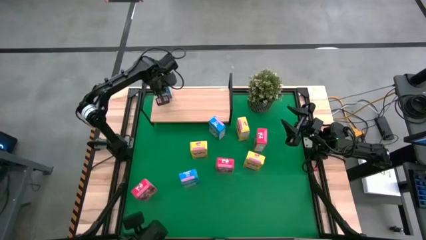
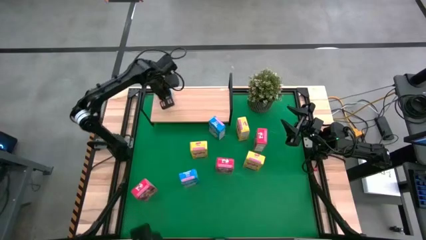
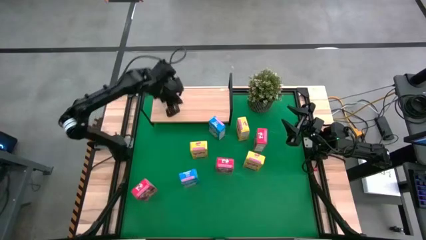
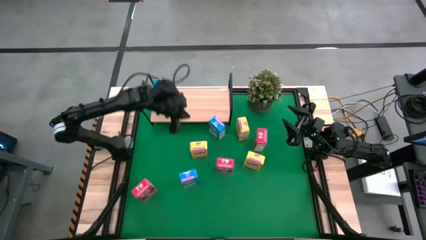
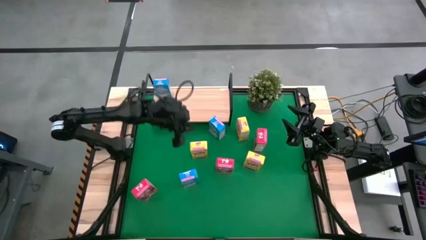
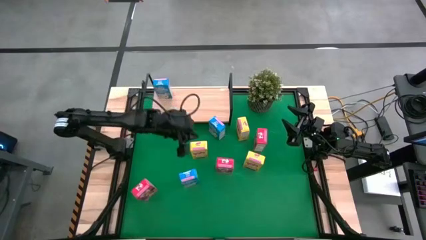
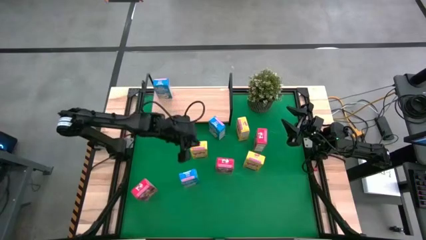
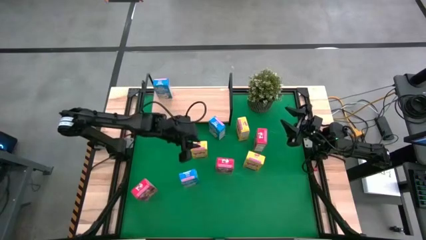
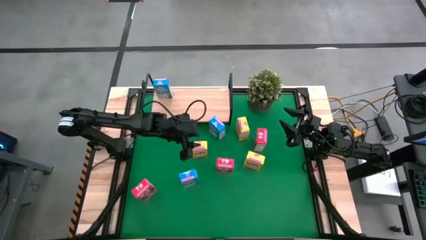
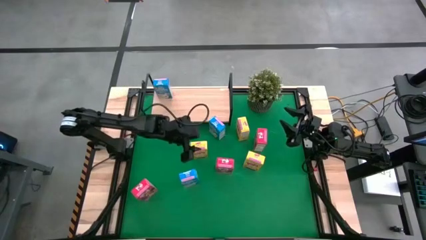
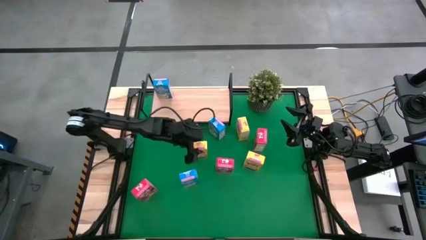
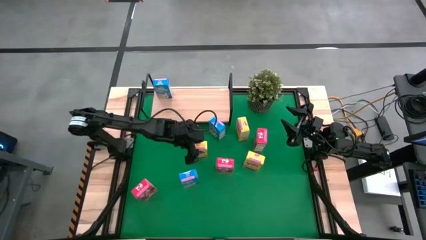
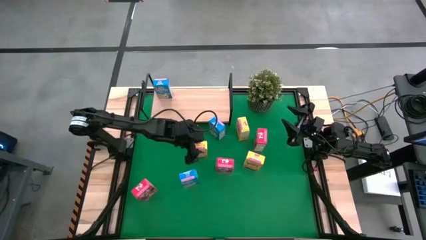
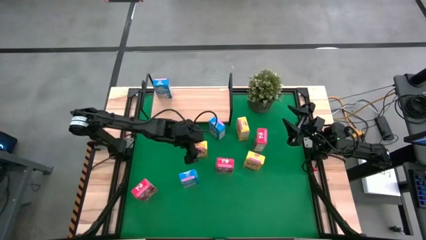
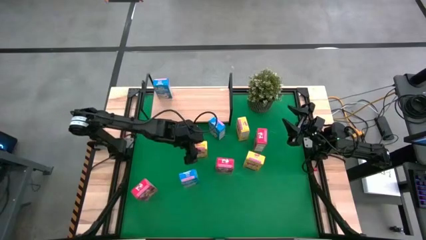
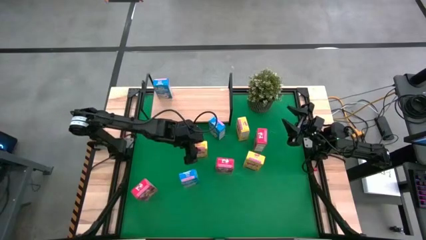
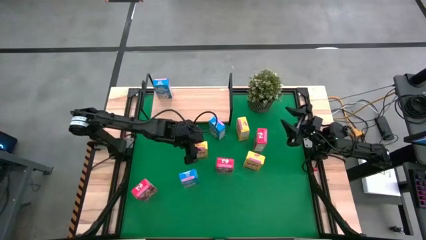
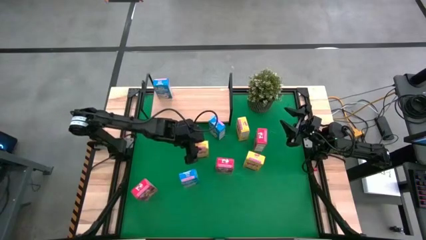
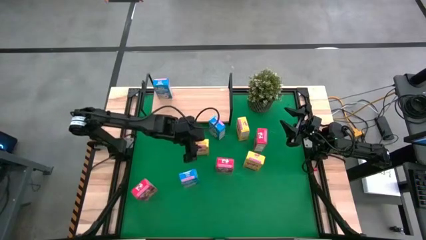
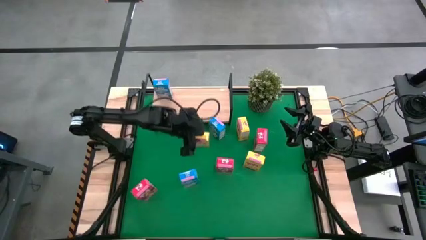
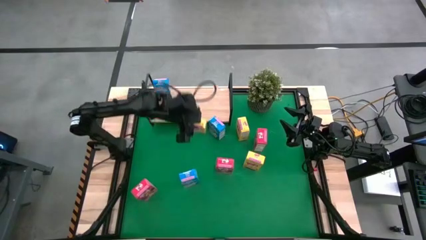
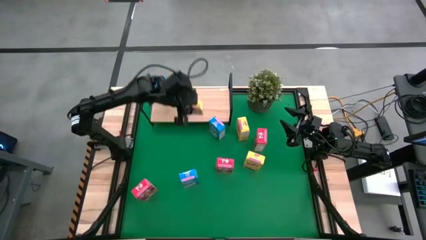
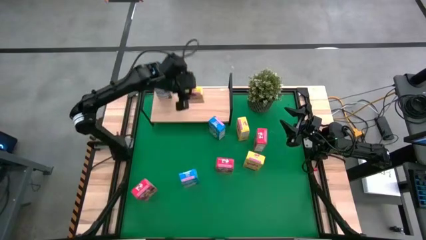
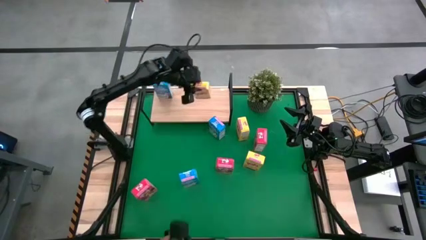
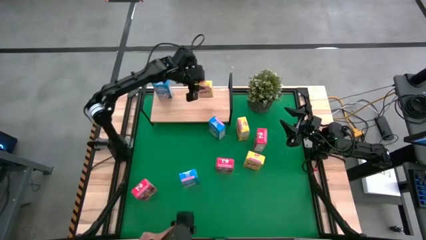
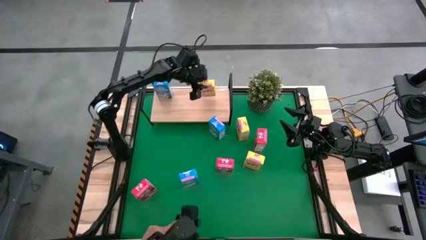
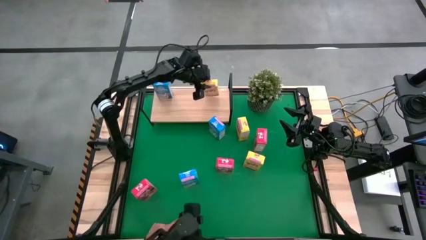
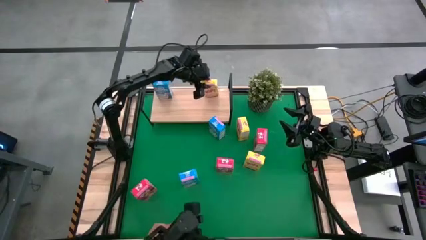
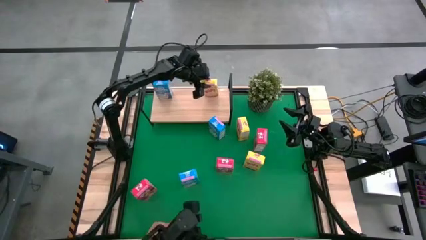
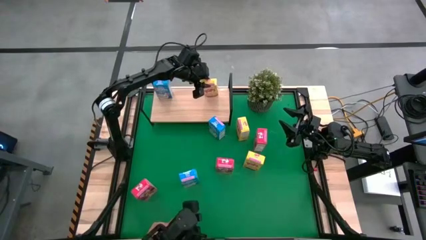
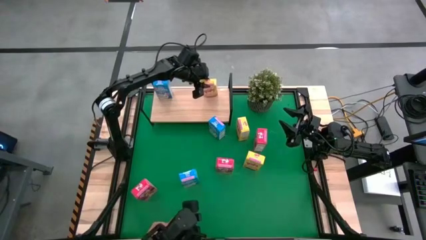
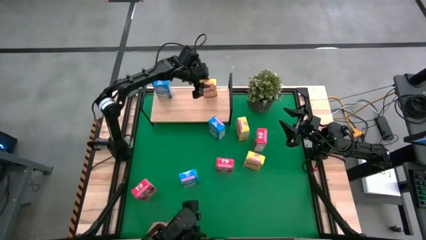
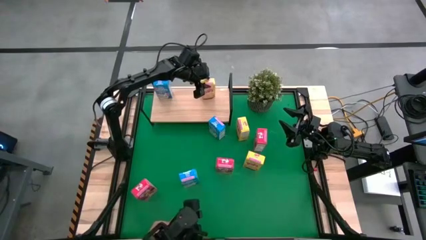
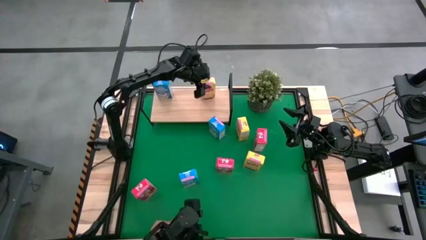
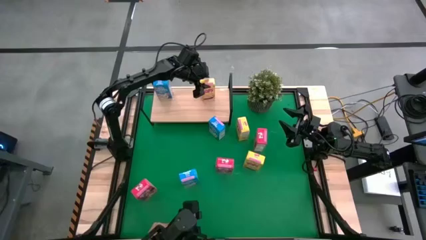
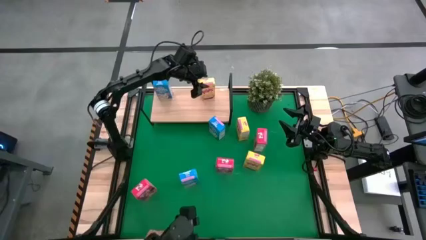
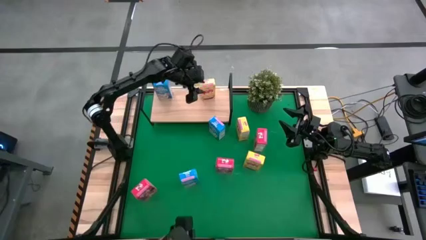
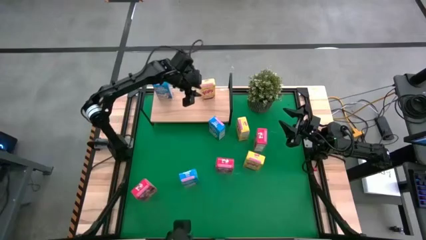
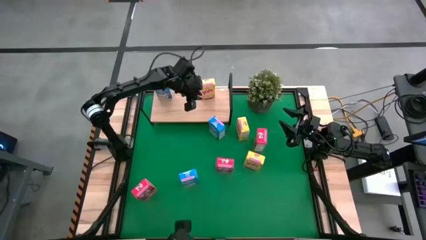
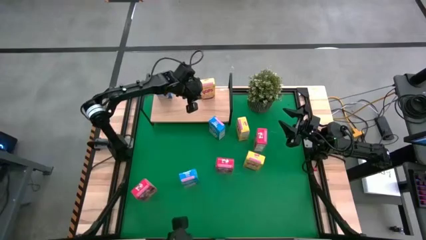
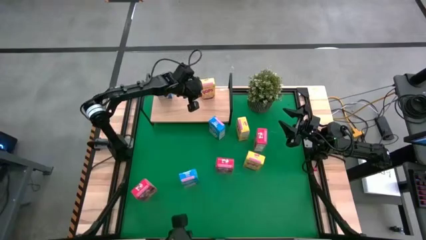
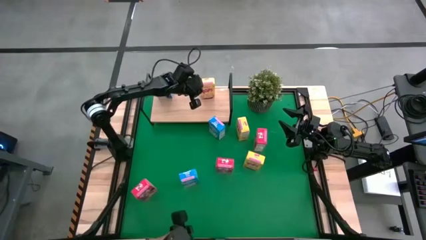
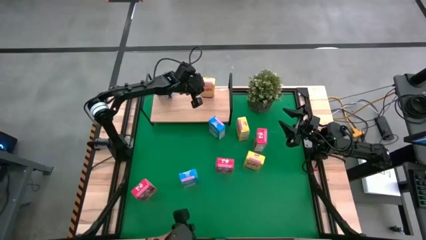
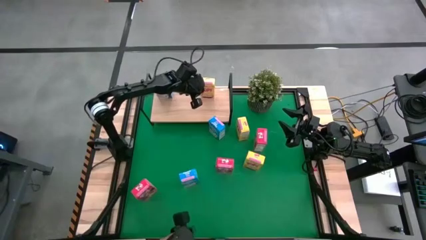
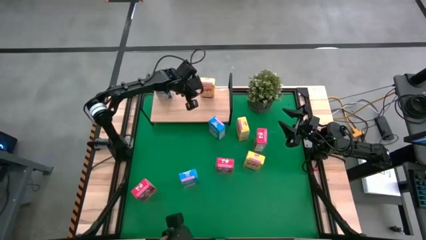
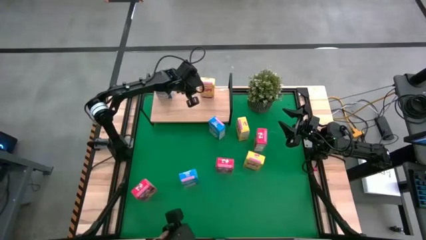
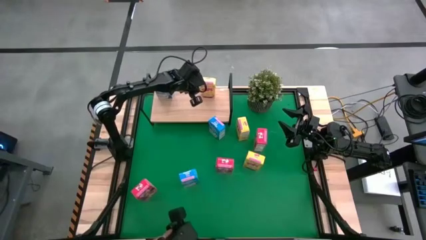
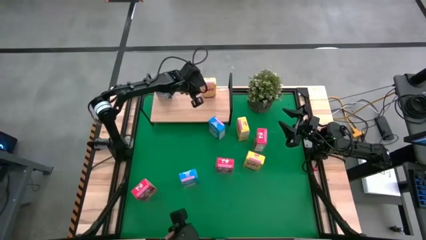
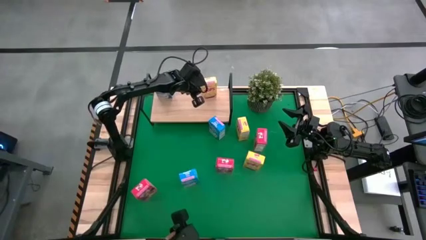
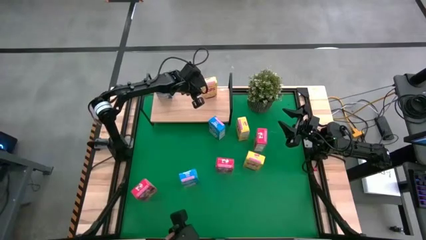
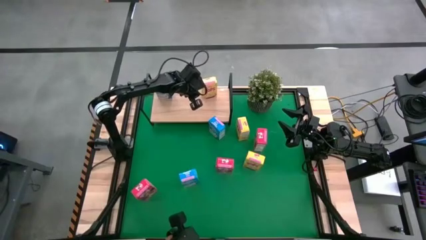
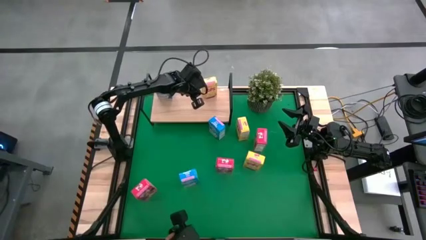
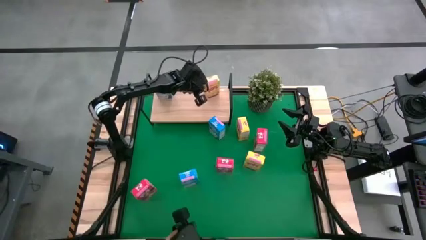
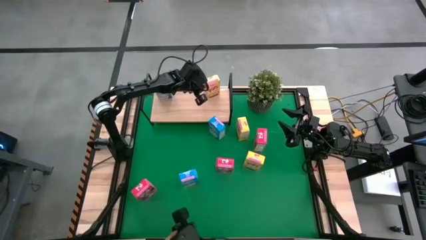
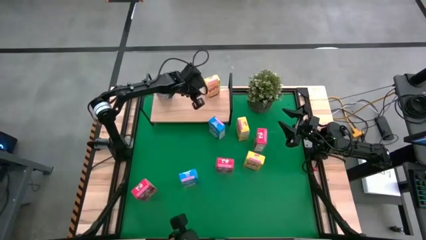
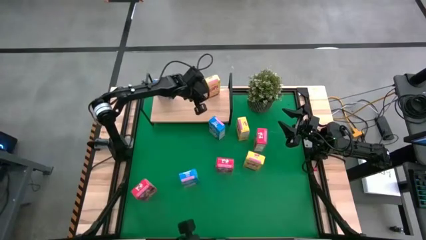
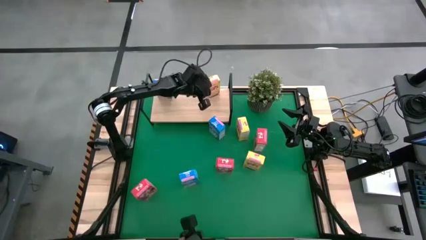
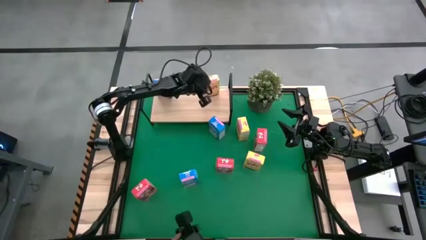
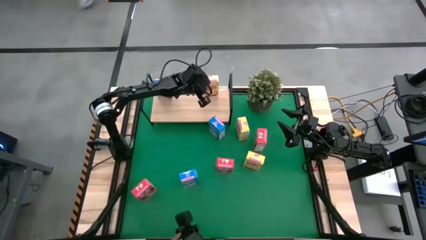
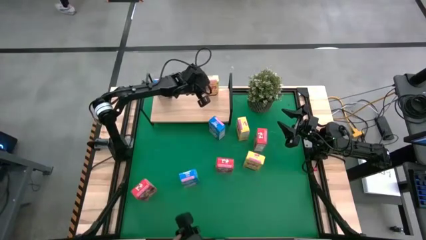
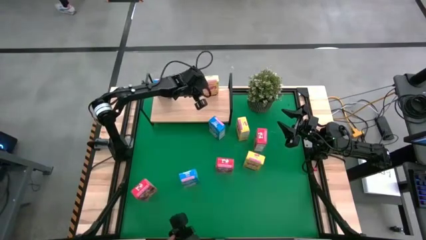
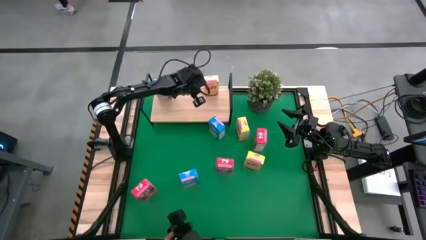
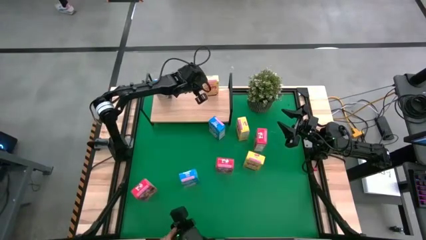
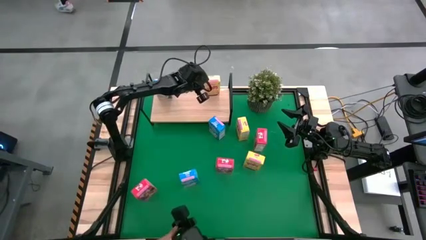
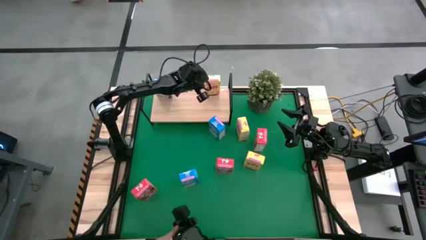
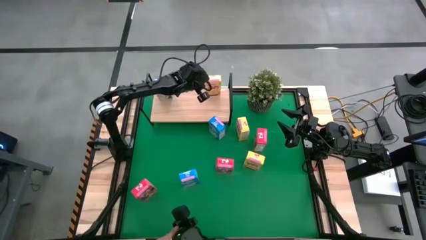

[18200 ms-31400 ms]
Task: Stack cereal on shelf
Put the left yellow cereal box on the shelf
